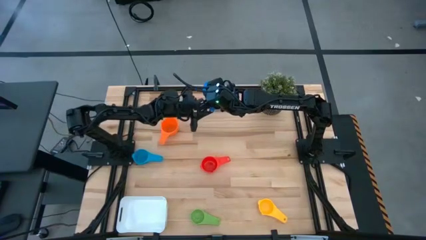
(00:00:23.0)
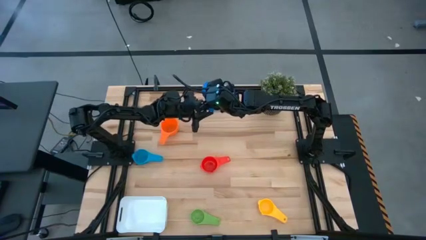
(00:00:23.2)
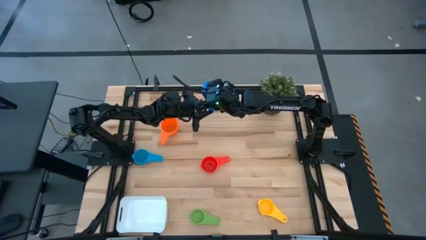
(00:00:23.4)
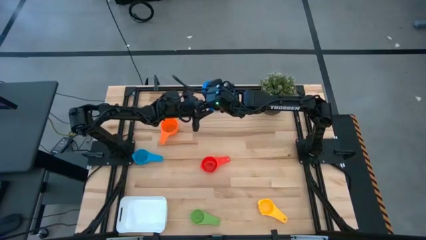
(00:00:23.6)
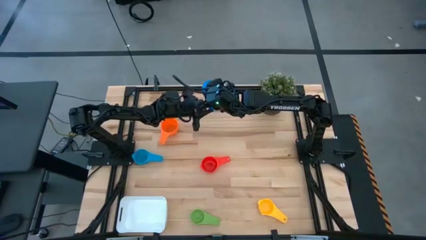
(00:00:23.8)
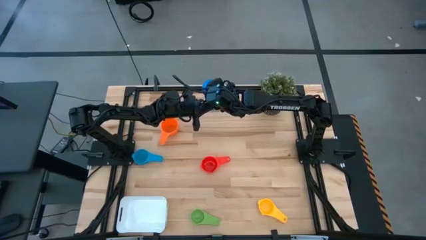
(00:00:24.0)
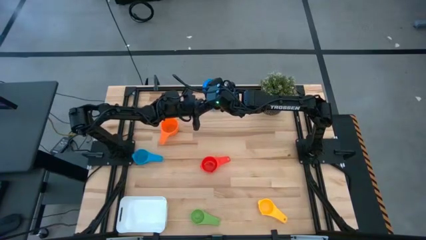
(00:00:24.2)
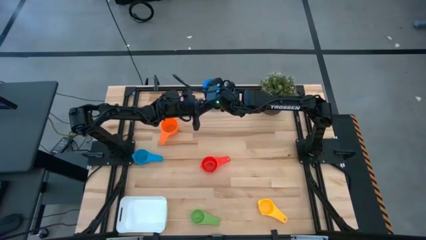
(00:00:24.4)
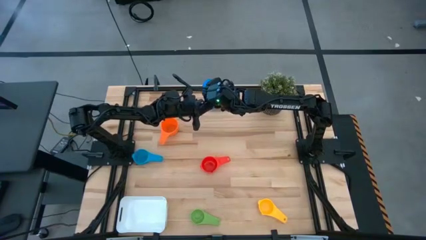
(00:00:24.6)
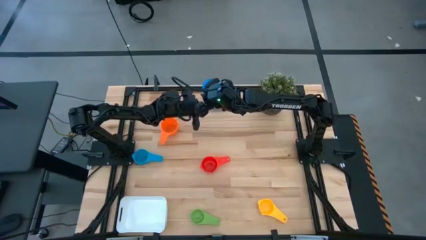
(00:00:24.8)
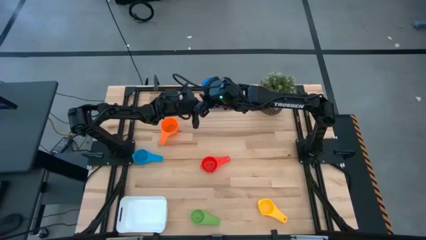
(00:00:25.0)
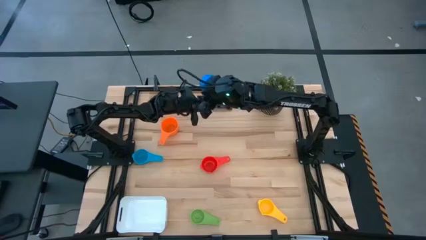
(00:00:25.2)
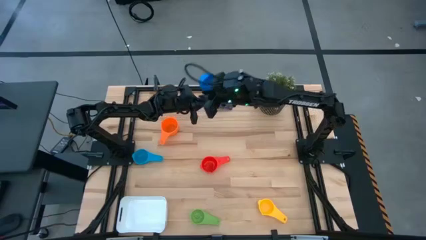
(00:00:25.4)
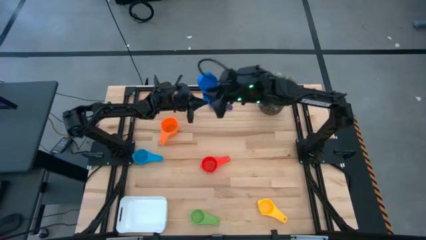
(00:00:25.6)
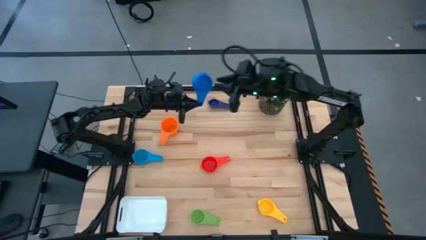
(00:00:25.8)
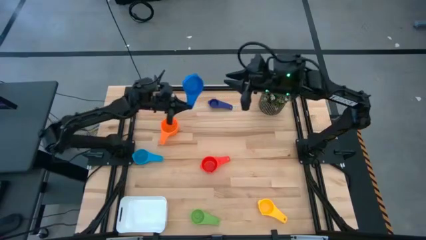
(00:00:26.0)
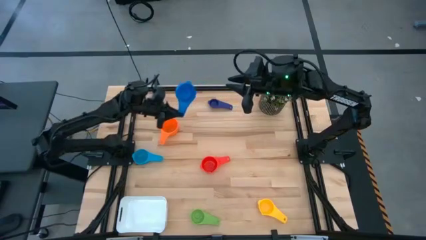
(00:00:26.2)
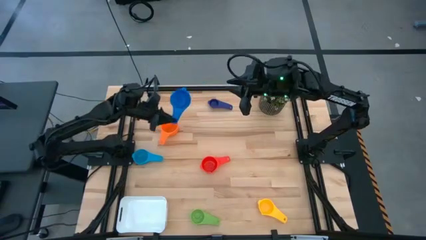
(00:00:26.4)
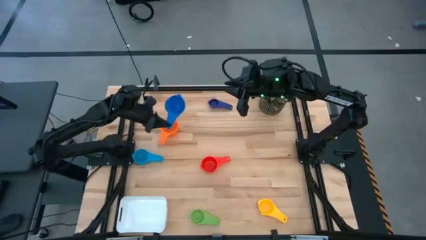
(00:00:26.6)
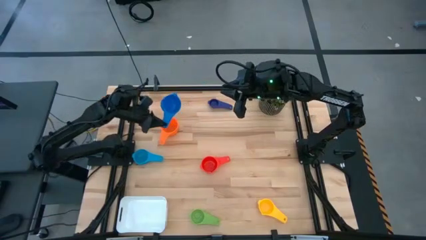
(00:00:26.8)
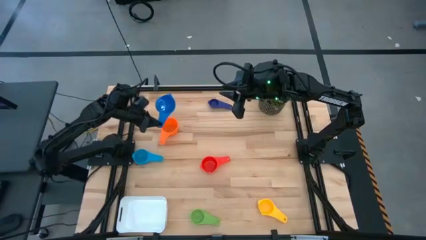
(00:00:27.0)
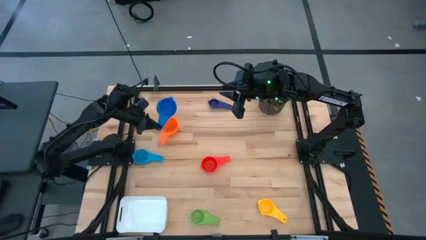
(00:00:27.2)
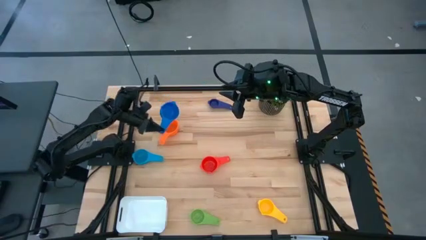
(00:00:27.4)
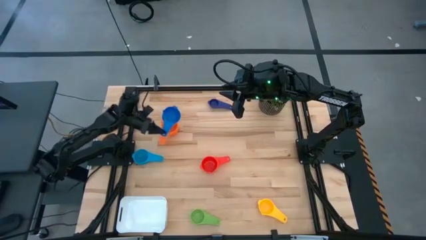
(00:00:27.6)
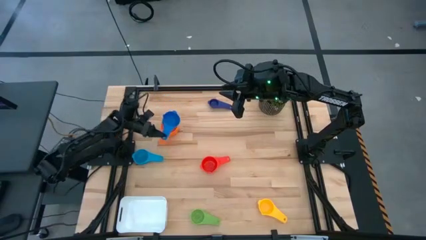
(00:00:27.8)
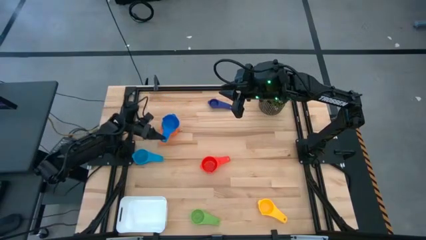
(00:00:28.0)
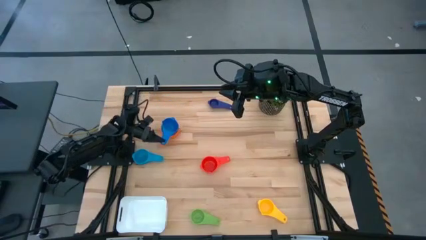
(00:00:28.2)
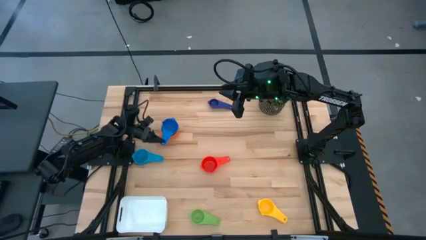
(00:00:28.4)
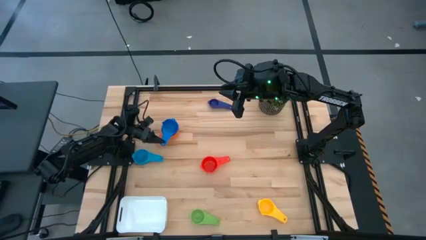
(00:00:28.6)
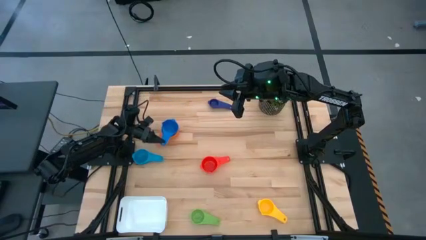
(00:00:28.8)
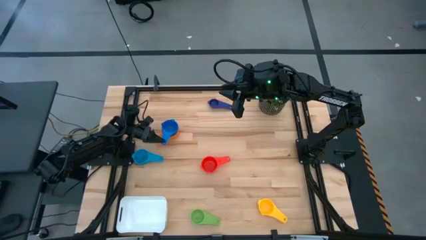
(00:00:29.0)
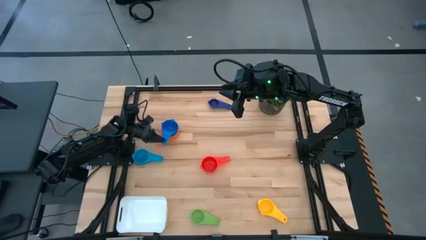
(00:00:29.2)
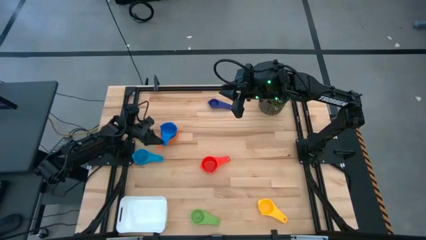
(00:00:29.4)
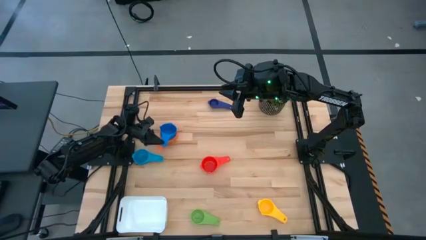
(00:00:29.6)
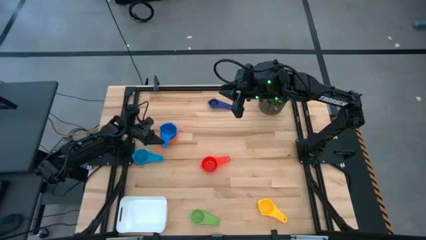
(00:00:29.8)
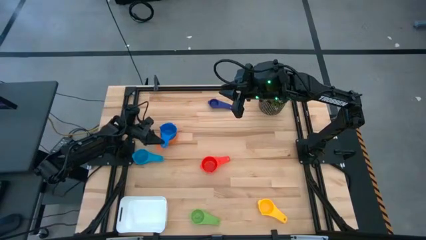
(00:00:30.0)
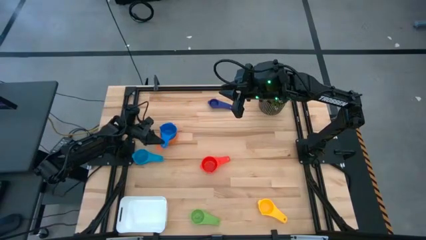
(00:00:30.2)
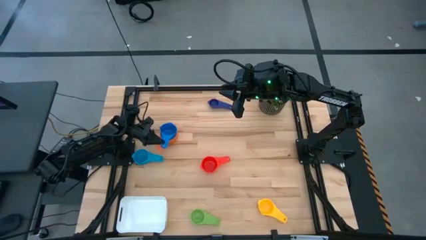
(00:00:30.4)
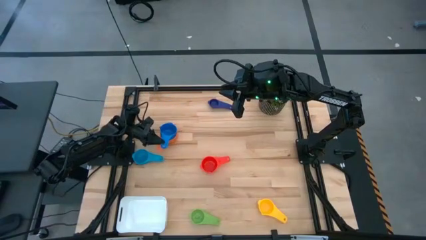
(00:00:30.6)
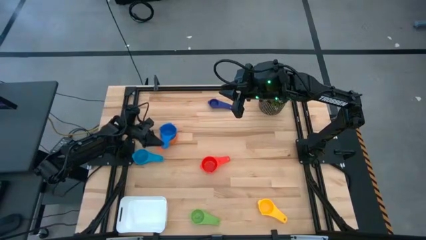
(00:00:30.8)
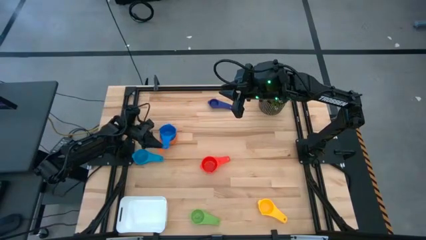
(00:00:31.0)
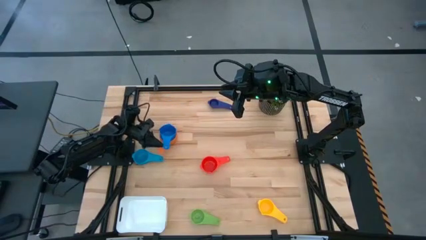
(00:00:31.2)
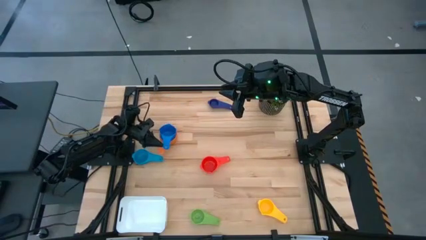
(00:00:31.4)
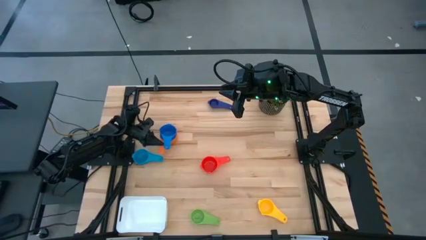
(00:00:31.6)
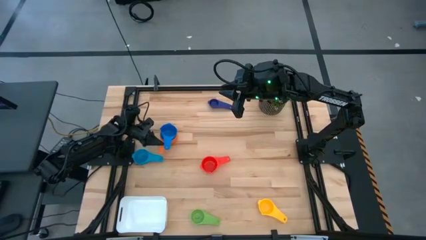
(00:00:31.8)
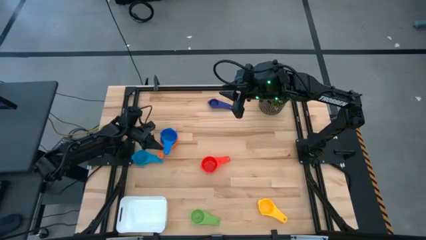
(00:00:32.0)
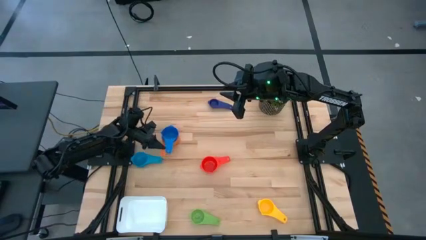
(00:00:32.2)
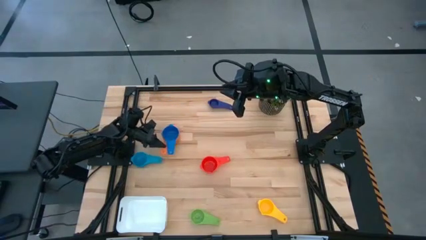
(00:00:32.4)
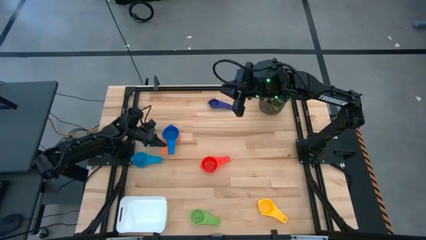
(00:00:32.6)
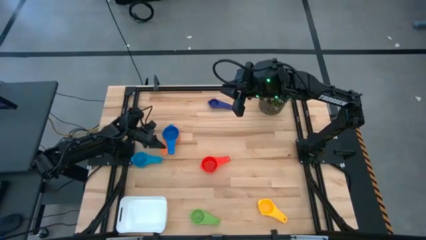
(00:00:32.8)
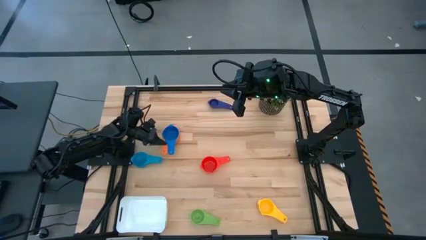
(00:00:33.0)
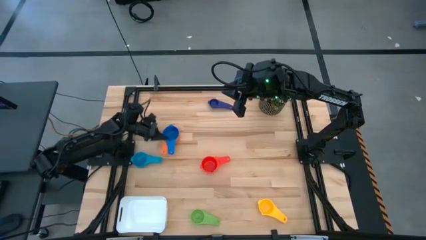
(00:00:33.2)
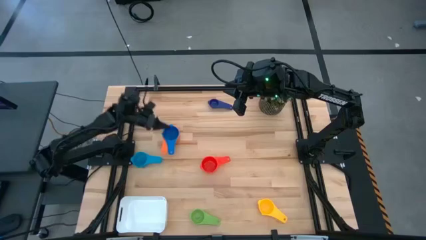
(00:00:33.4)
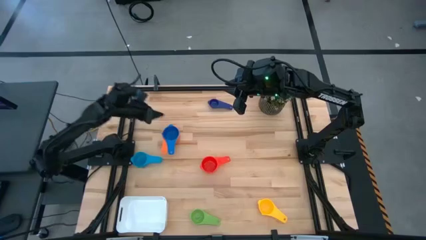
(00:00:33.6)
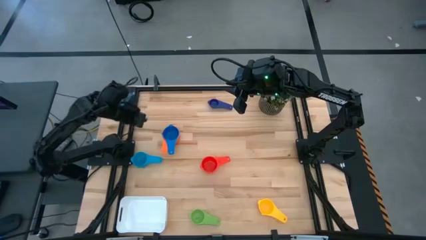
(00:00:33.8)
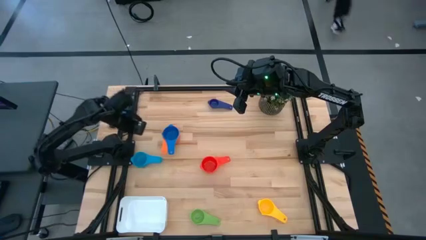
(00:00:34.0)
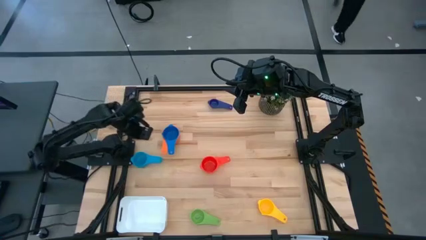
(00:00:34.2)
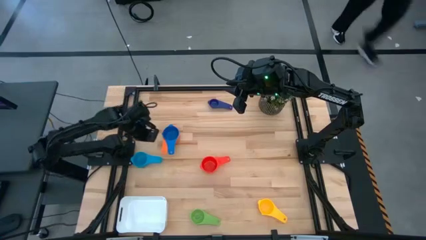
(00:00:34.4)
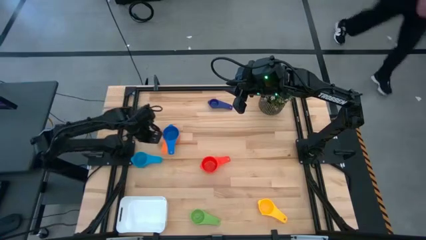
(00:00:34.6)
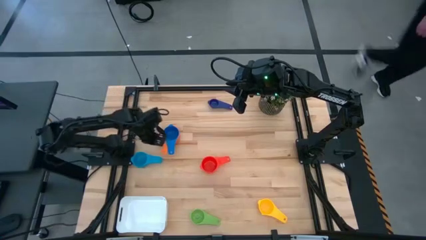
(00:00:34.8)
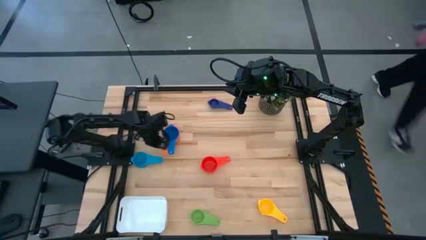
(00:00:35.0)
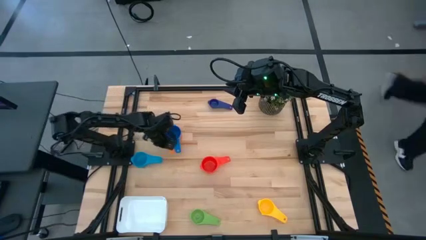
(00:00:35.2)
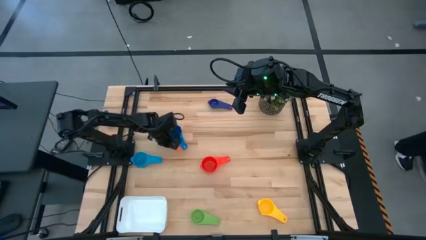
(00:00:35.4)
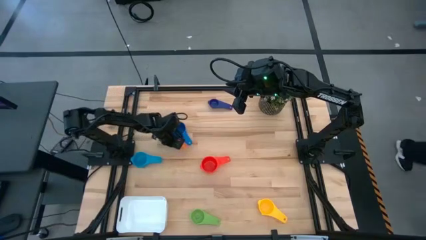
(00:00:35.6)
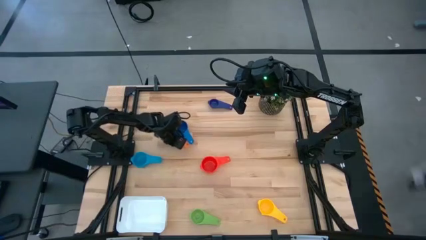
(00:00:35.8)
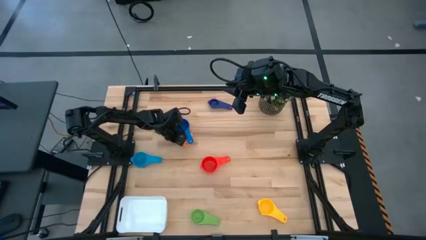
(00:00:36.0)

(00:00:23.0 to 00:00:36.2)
Task: Nest measuring cups in basket
Stack the dark blue measuring cup into the orange measuring cup

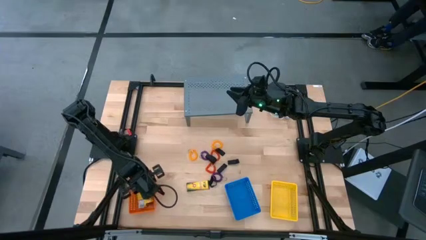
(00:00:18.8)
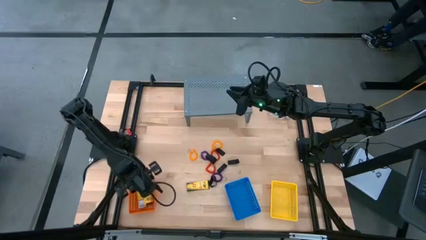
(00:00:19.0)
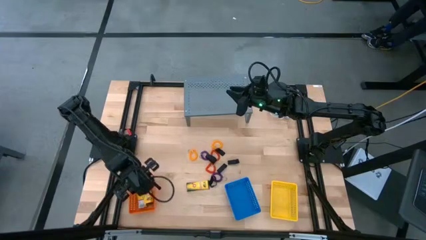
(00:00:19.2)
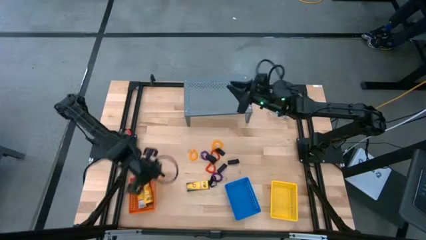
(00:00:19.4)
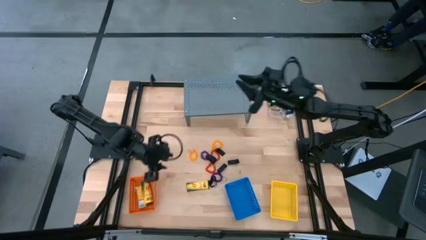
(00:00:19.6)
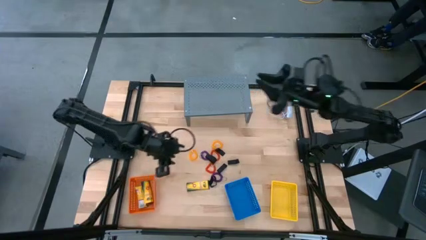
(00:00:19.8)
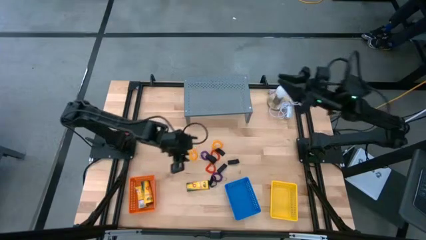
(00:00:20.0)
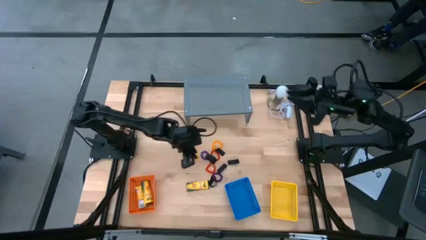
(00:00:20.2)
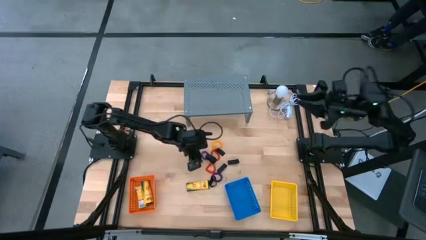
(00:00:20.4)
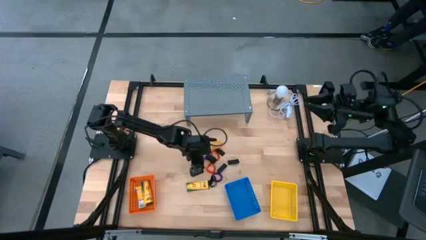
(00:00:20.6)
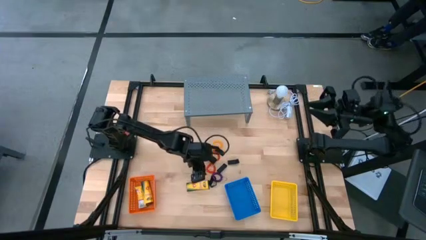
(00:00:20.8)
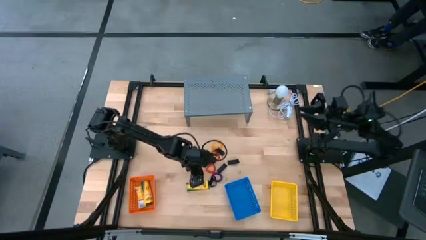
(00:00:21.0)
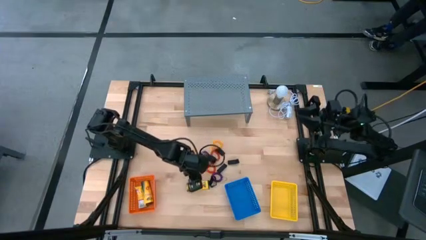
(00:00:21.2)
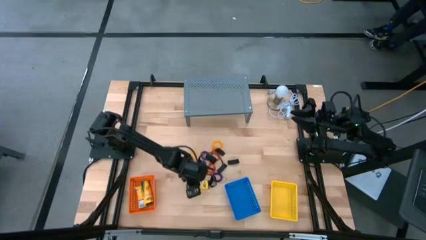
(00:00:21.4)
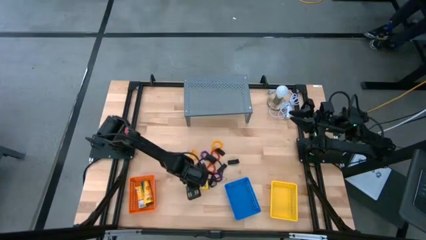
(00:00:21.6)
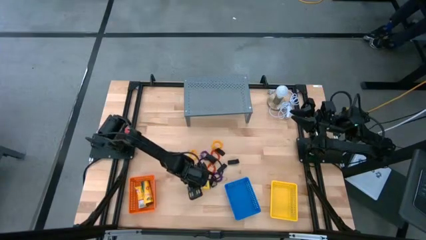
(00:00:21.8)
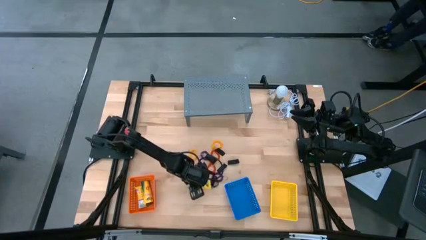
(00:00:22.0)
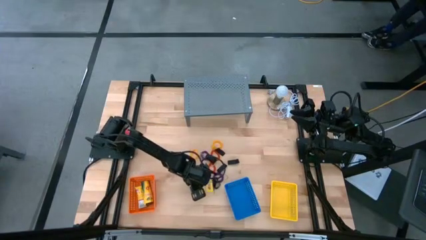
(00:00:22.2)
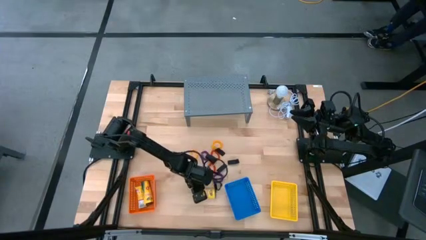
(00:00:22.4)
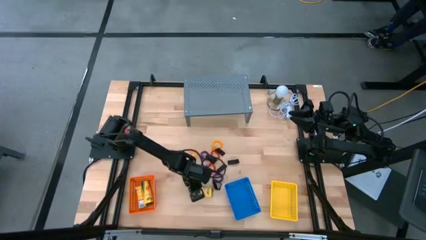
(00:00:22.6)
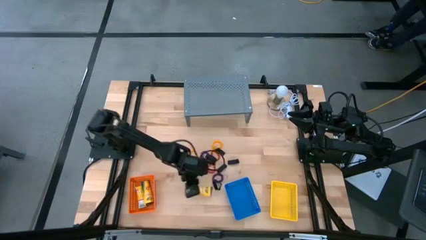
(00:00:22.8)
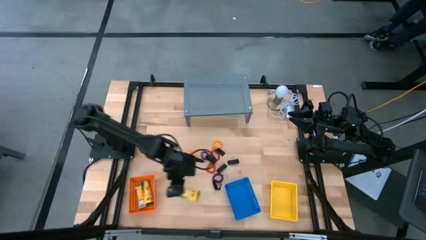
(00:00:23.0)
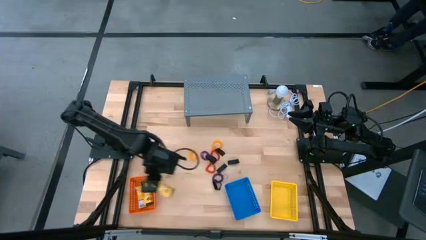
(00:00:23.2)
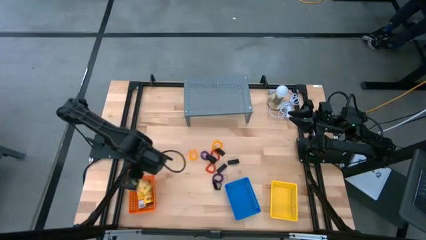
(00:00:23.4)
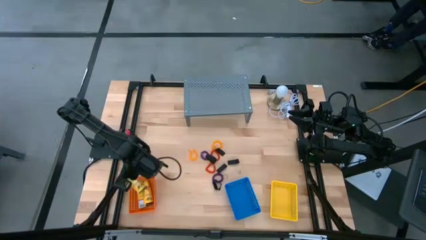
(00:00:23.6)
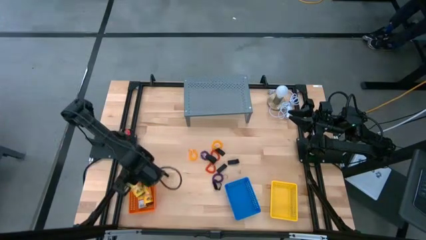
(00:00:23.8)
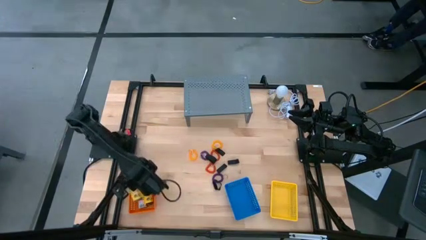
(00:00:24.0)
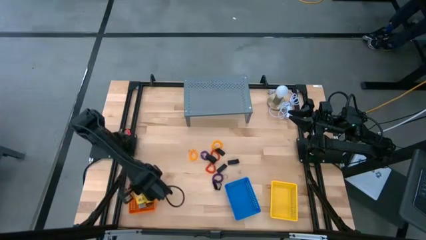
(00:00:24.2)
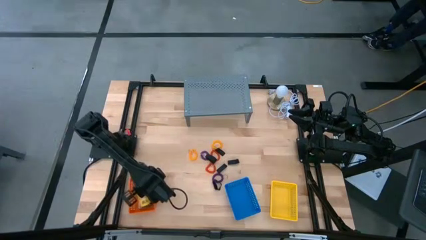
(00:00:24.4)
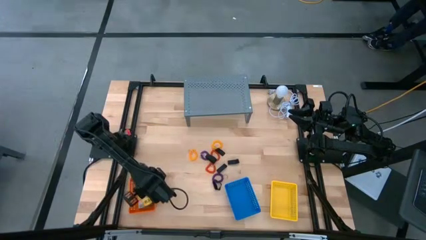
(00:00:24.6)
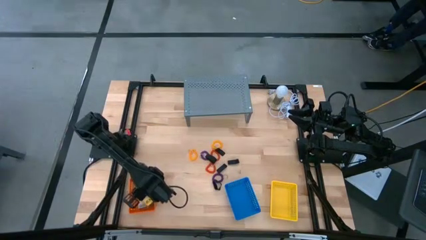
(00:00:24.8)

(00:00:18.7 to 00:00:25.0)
Task: Pick & Place Office Desk Supplies
Put the yellow crayon box into the orange bin
